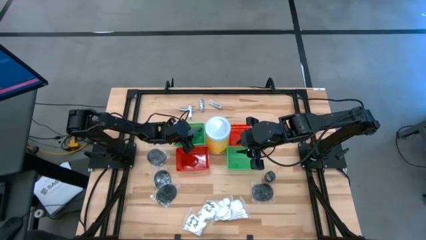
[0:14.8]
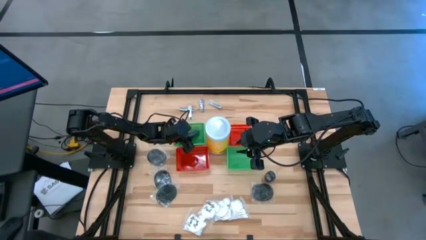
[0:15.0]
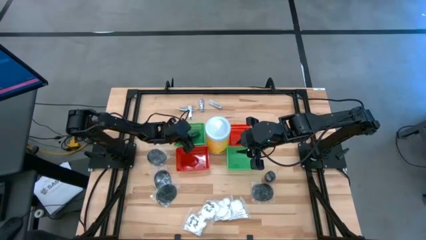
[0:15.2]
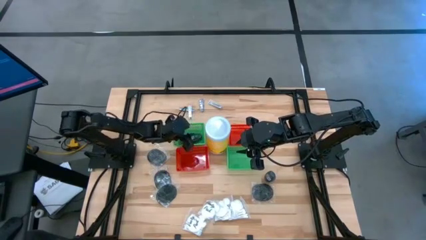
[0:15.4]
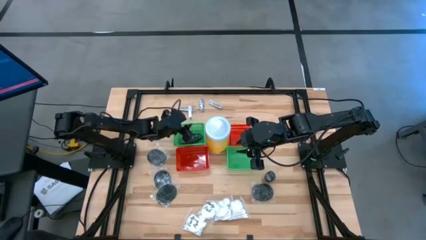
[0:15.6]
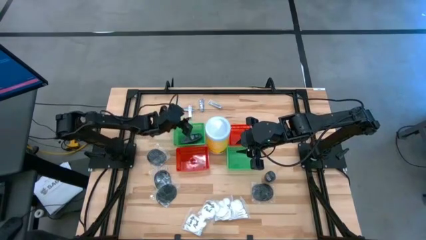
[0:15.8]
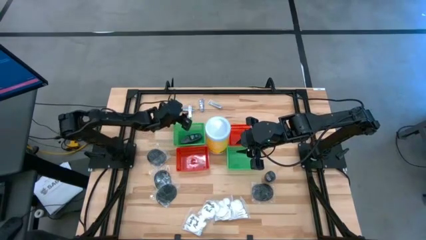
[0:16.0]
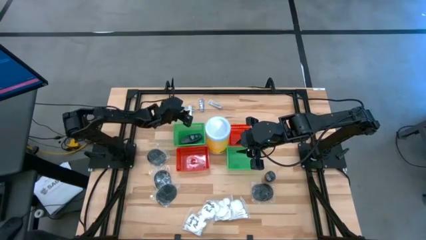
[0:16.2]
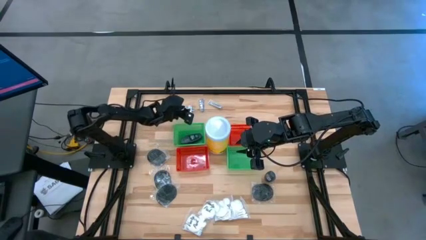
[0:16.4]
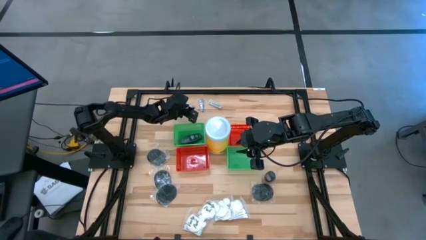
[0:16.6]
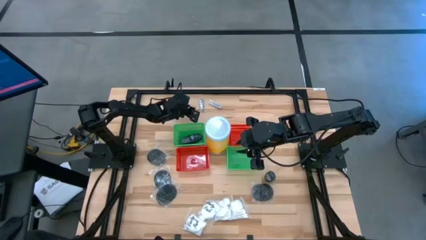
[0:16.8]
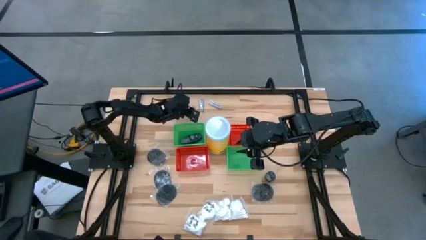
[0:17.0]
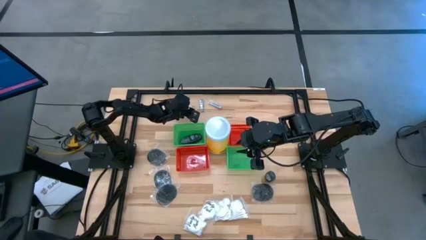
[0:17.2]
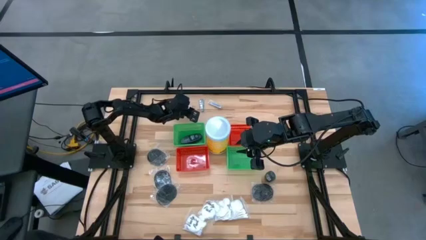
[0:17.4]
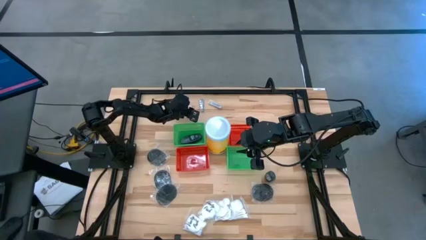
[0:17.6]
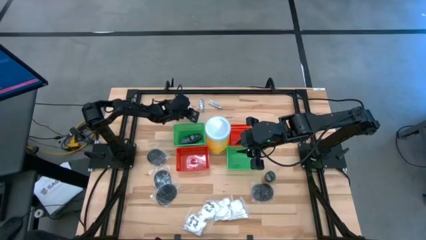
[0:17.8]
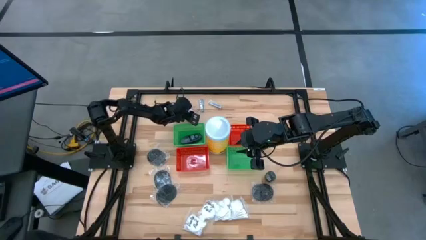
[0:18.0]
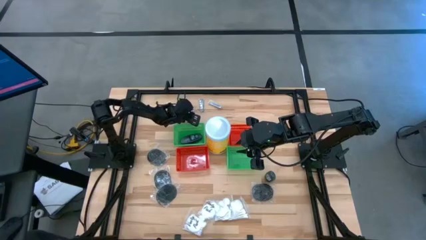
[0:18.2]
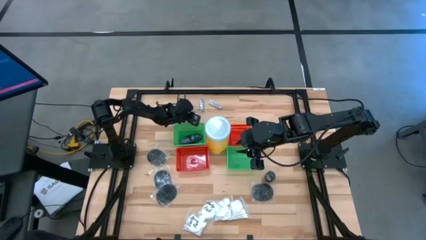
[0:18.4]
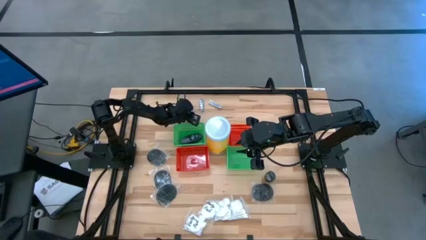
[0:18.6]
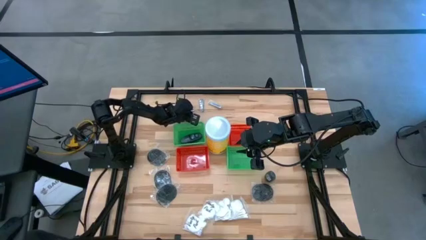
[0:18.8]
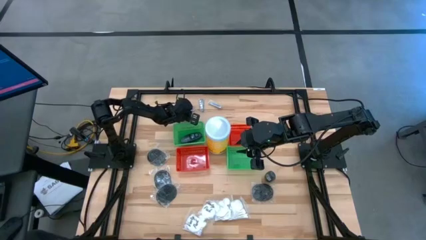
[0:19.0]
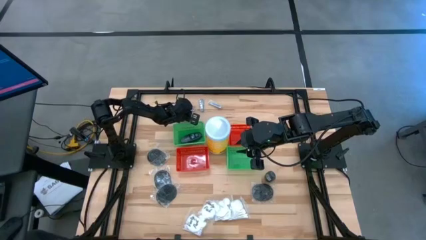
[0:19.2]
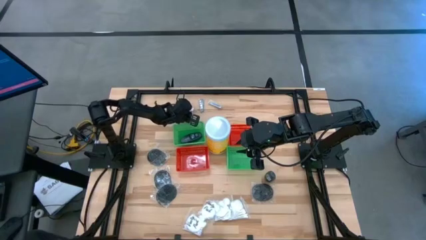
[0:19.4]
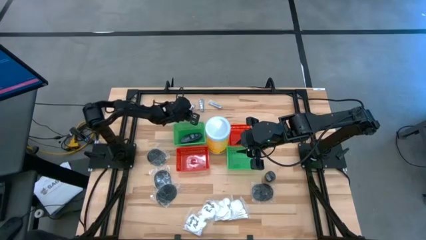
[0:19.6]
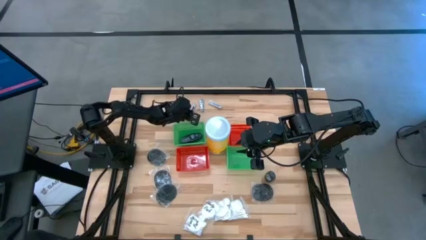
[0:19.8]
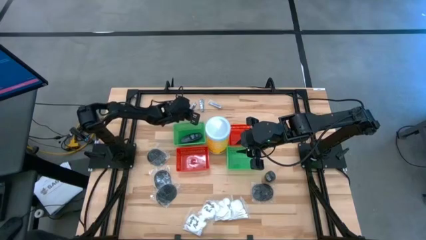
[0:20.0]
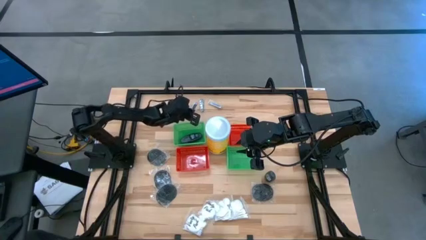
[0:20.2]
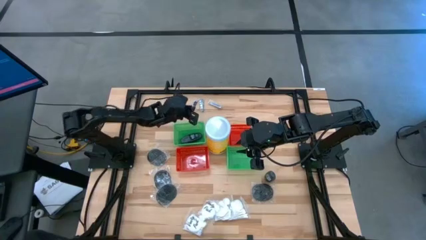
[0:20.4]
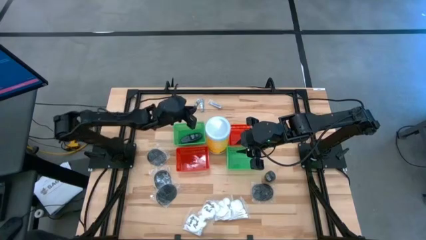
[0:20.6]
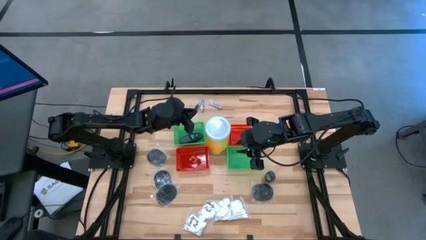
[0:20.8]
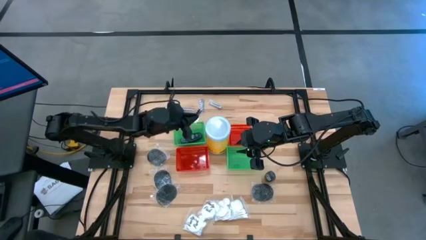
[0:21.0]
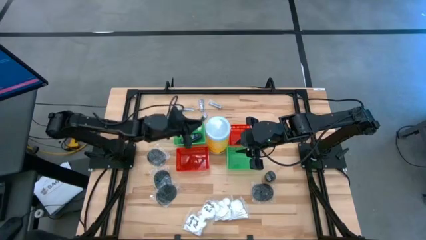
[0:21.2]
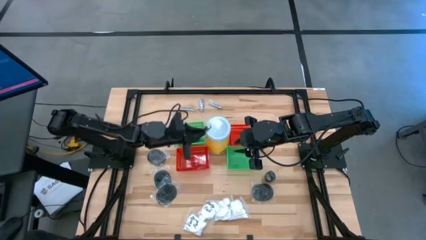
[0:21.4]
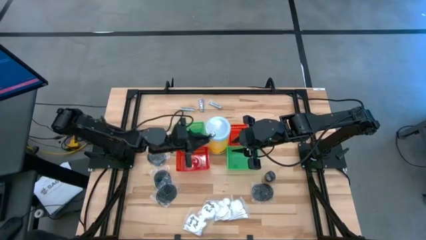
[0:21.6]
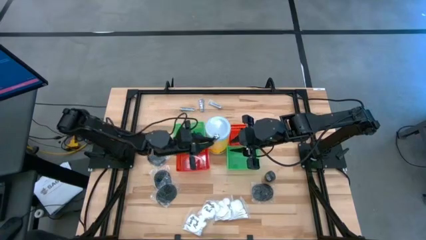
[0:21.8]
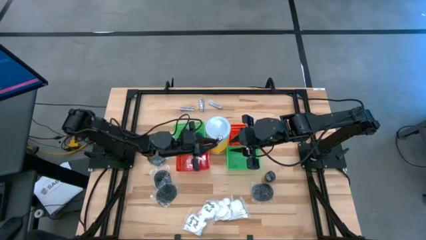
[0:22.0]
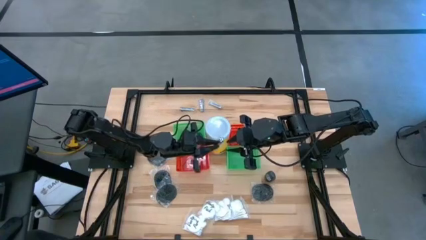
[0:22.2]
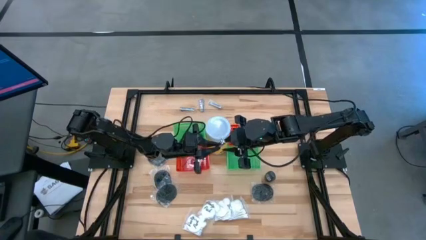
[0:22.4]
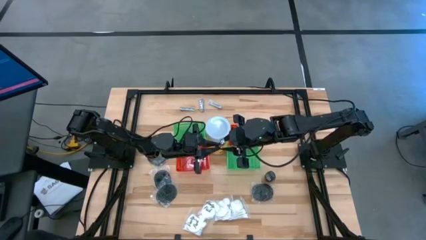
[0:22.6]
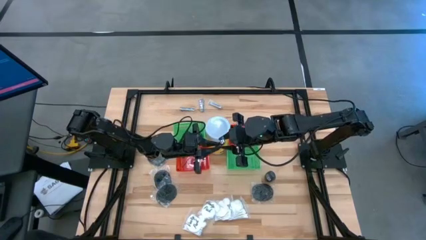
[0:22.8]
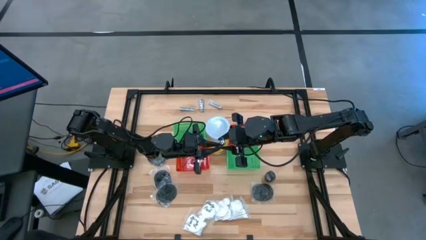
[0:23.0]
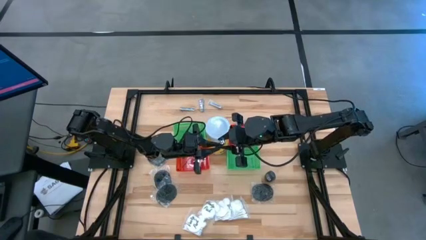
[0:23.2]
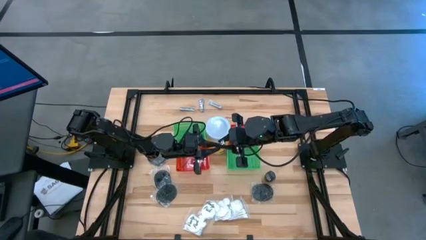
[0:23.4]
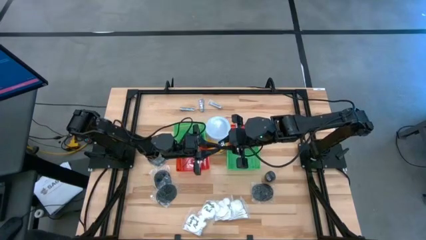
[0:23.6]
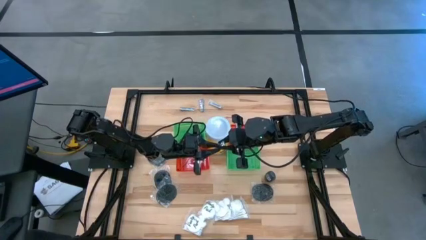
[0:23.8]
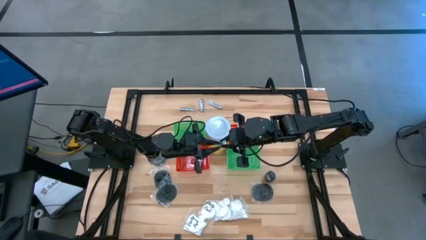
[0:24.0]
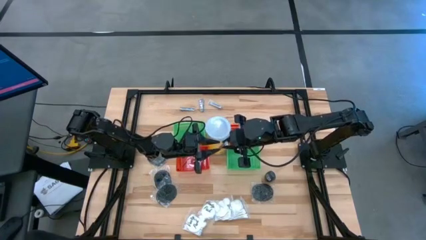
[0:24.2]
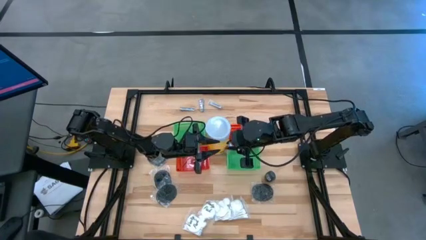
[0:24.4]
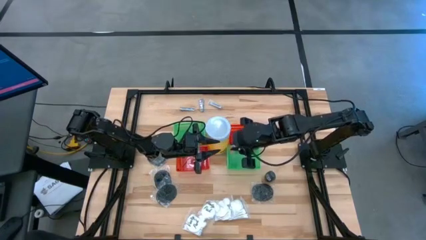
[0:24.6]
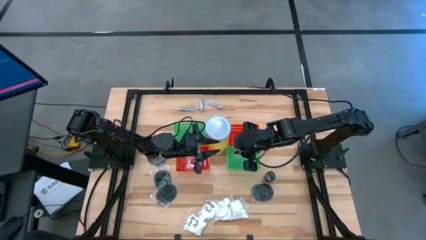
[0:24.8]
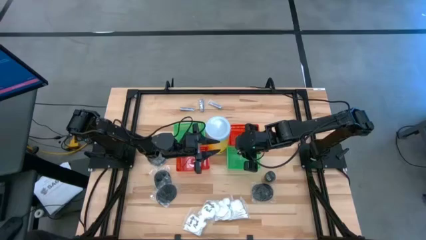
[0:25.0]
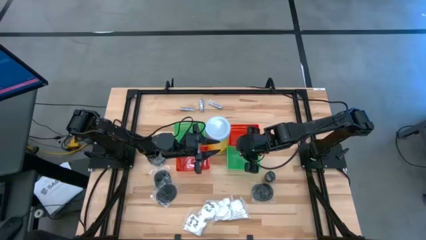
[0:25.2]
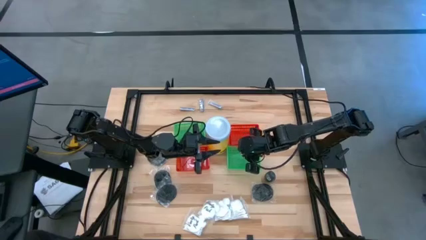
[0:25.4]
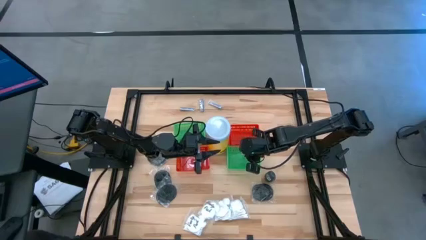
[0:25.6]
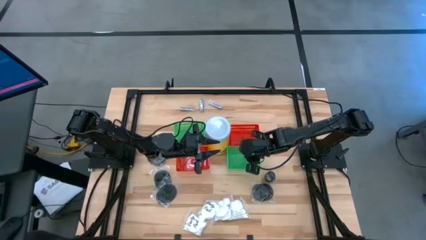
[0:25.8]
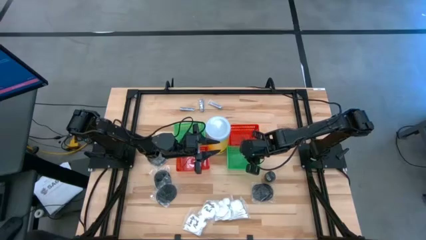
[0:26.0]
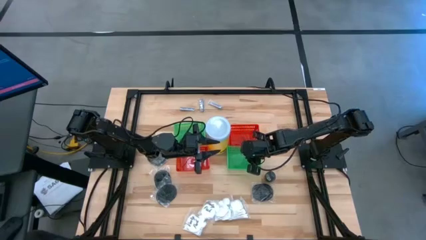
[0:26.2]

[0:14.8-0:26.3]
Task: Pick & Place Travel size toiletries
Put the silver nail cutter into the right green bin

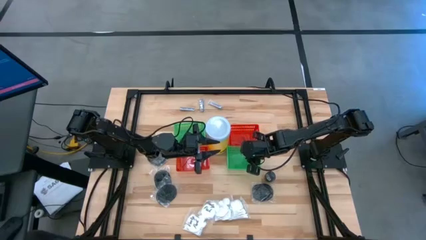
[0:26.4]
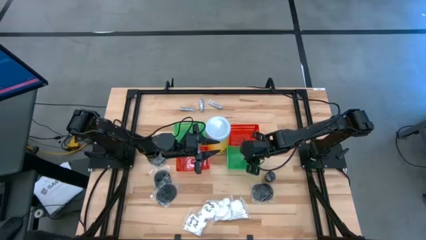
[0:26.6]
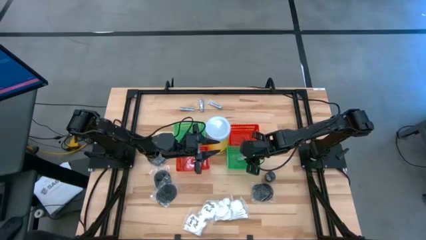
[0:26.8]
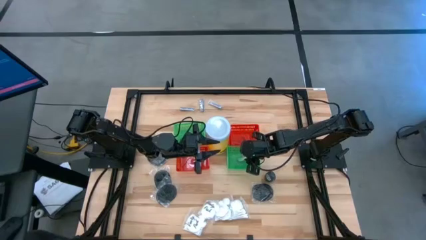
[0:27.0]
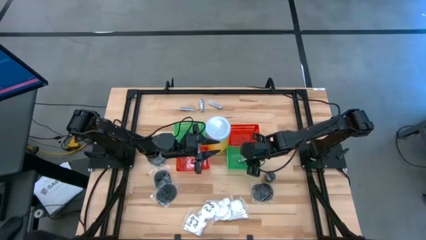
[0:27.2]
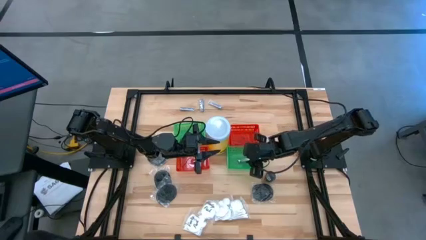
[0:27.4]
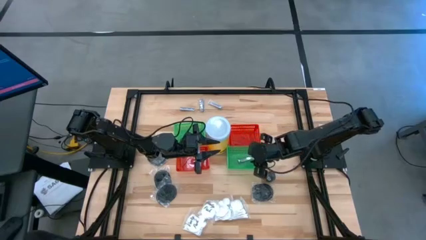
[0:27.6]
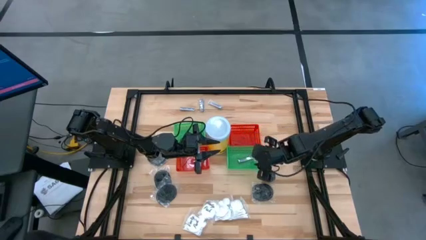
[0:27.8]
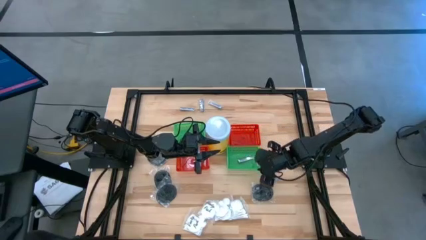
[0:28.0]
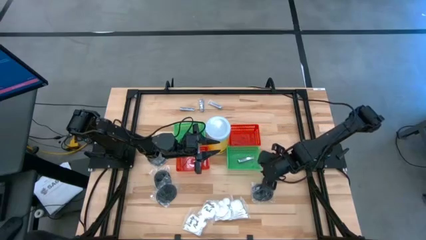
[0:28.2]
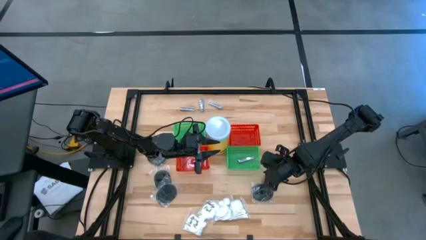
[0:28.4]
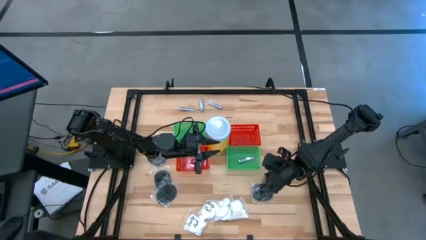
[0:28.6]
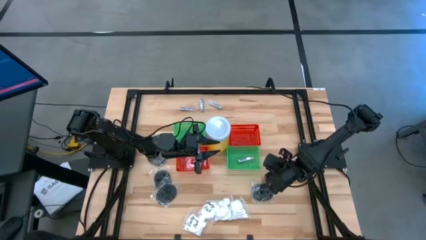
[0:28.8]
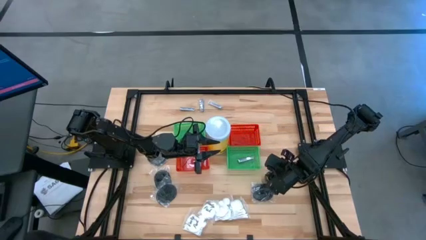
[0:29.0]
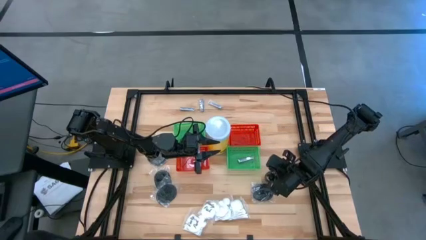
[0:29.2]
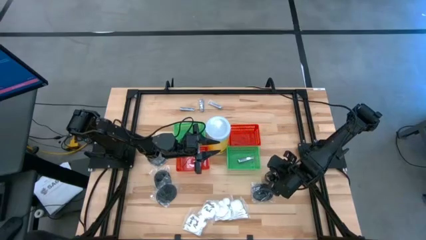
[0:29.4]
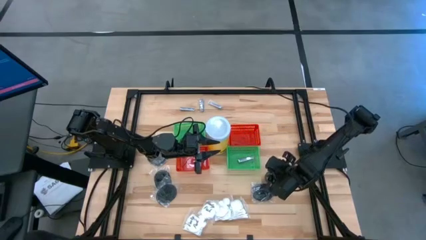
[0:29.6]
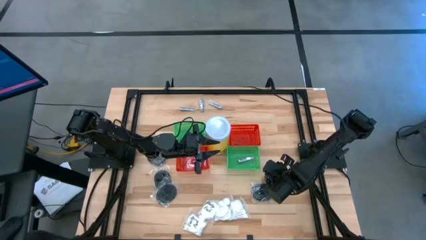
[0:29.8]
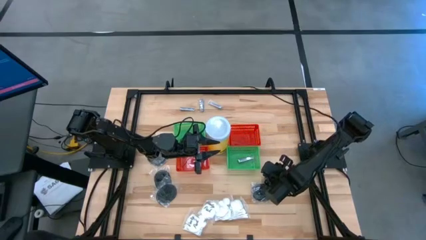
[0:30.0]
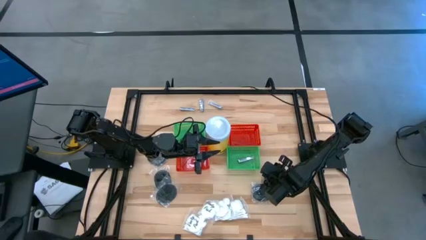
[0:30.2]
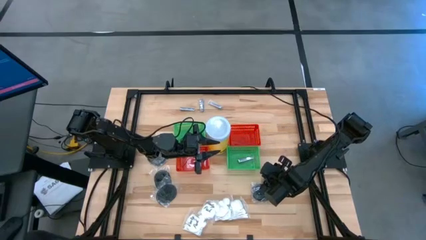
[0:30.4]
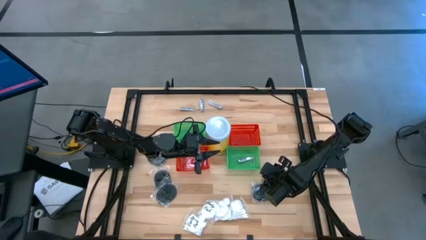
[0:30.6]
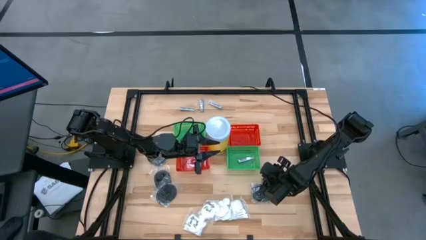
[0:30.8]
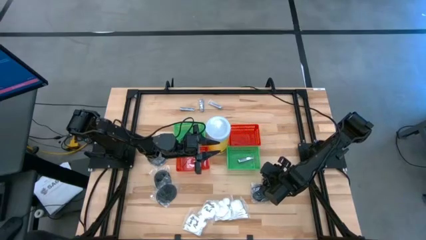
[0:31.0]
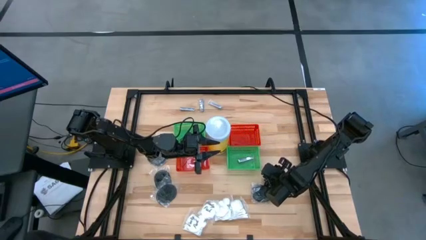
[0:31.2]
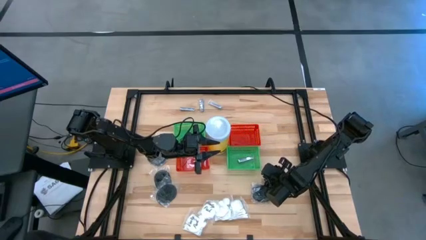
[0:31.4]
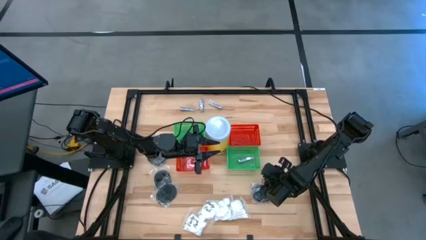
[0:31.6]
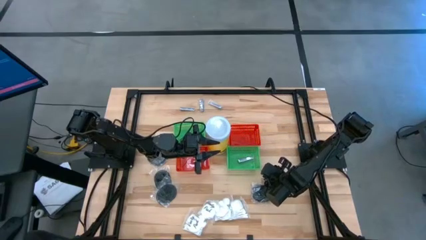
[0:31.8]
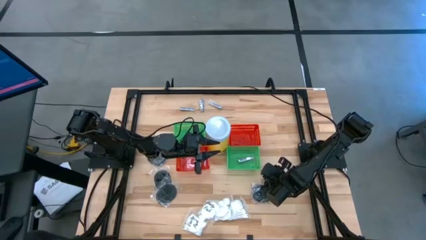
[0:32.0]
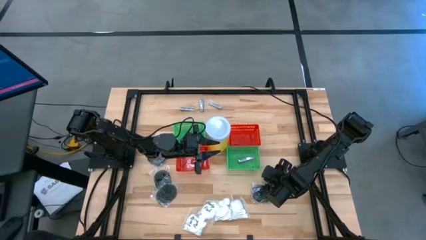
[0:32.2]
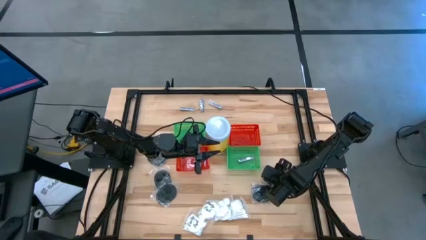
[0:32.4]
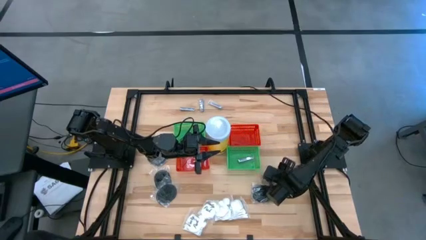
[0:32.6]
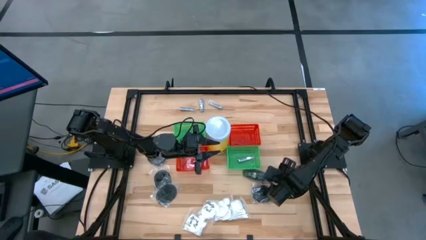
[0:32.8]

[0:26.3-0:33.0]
Put the black deodorant into the left green bin
